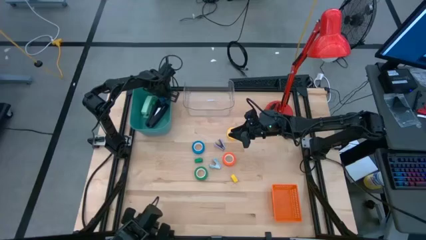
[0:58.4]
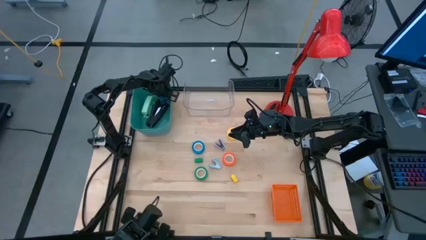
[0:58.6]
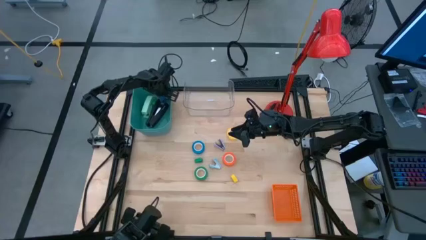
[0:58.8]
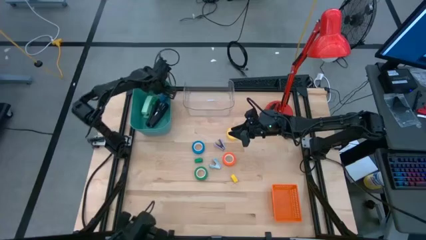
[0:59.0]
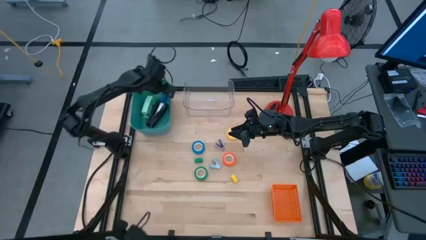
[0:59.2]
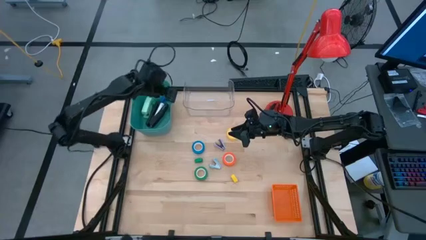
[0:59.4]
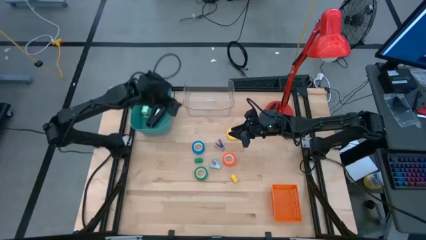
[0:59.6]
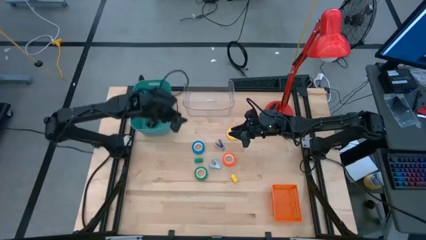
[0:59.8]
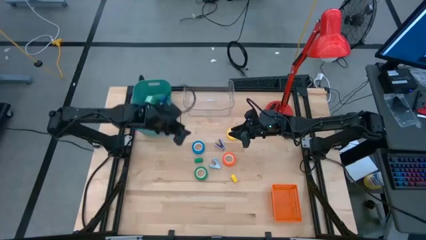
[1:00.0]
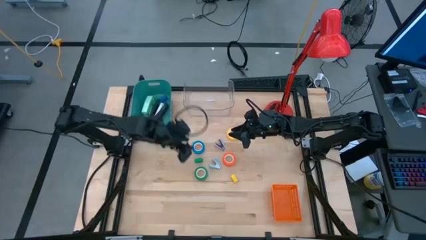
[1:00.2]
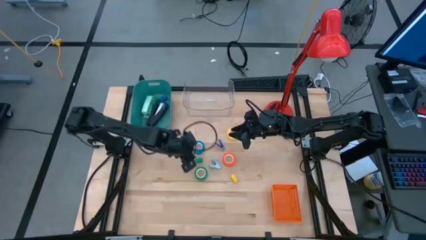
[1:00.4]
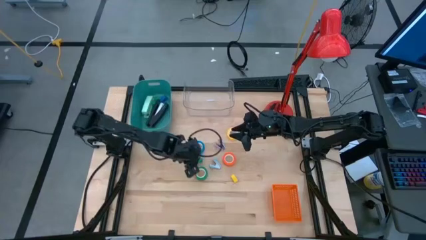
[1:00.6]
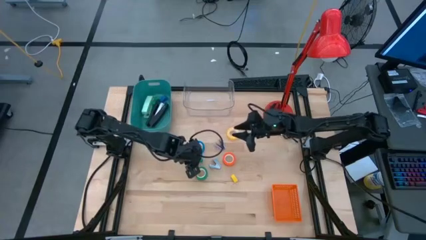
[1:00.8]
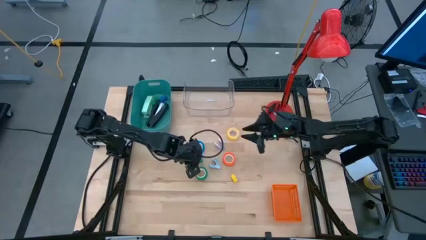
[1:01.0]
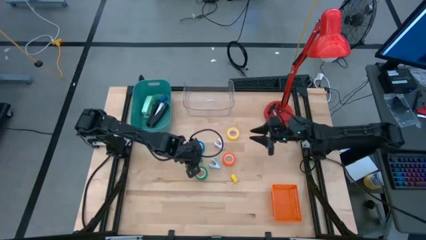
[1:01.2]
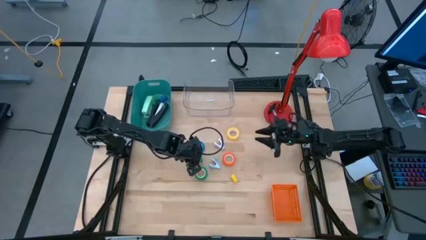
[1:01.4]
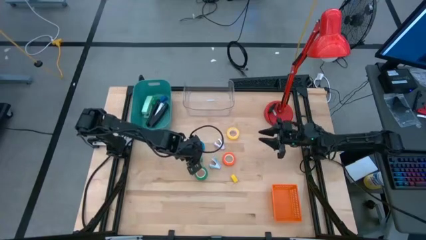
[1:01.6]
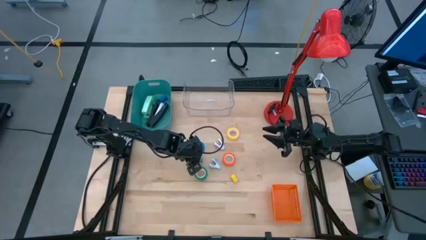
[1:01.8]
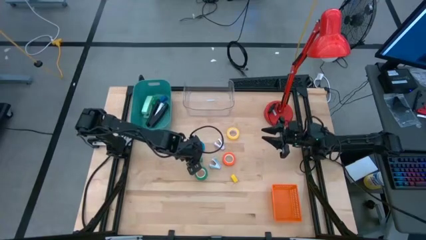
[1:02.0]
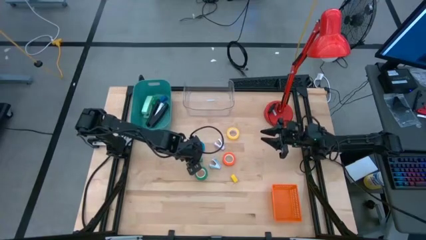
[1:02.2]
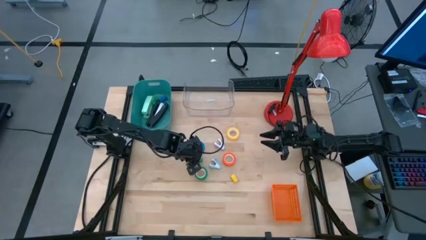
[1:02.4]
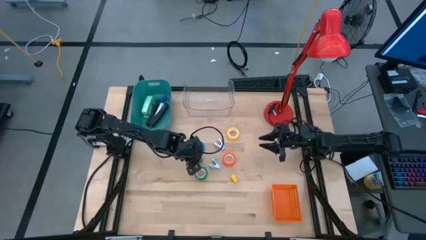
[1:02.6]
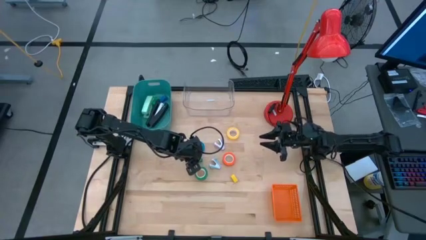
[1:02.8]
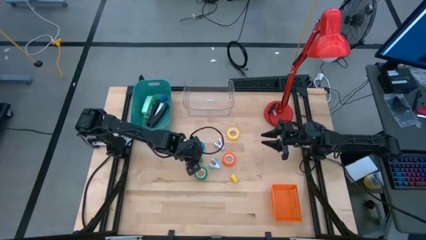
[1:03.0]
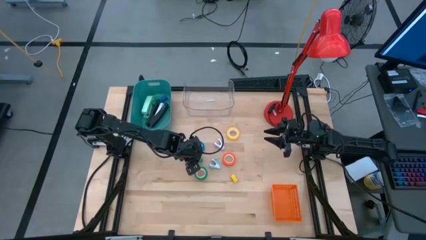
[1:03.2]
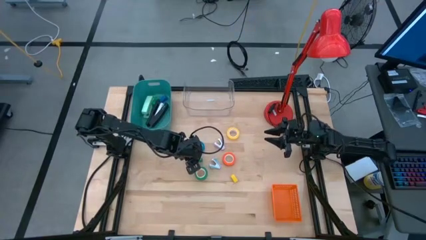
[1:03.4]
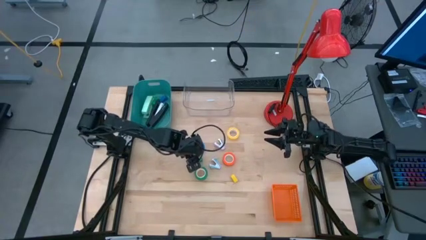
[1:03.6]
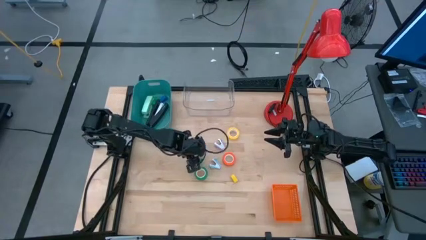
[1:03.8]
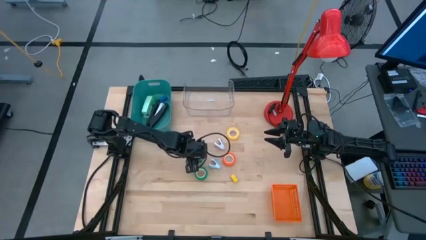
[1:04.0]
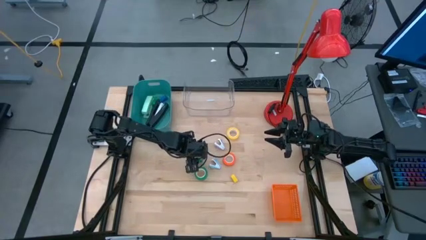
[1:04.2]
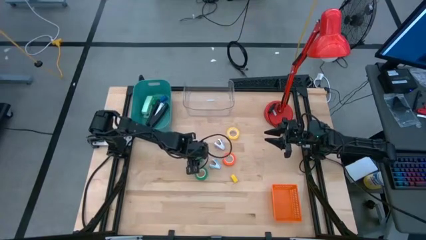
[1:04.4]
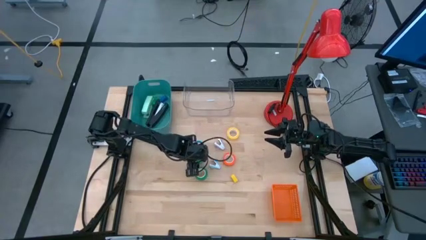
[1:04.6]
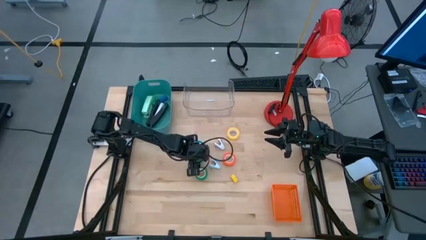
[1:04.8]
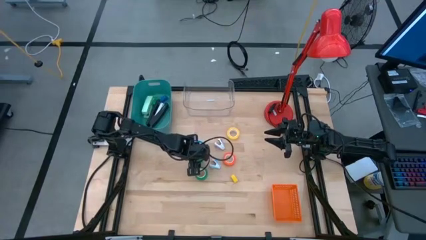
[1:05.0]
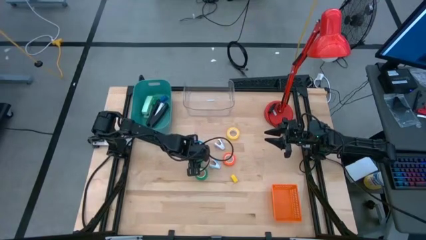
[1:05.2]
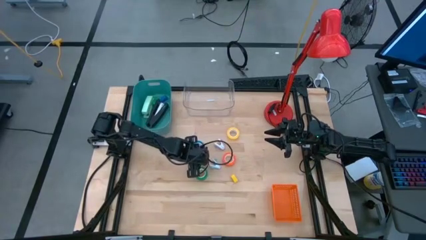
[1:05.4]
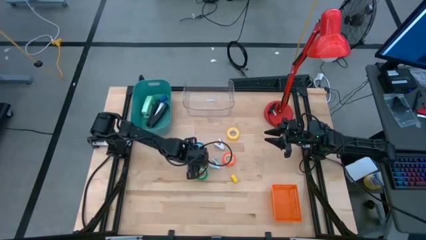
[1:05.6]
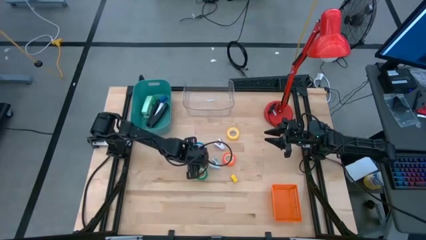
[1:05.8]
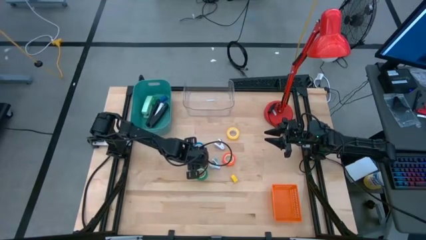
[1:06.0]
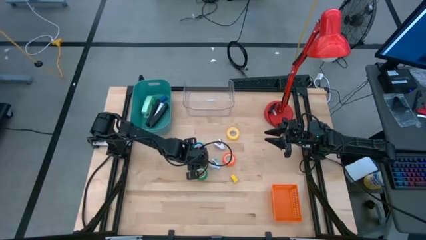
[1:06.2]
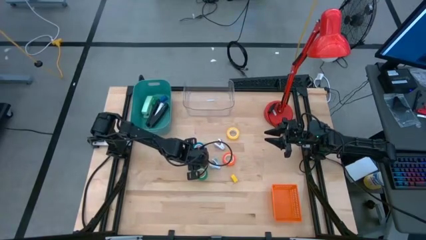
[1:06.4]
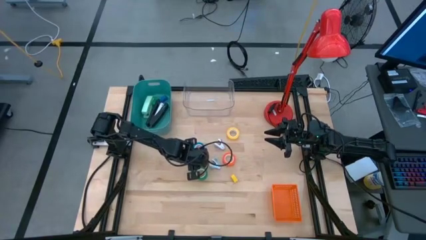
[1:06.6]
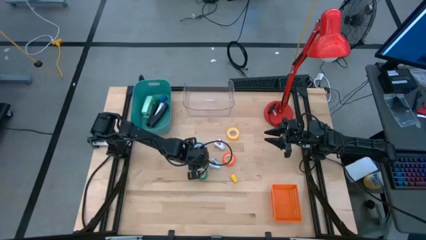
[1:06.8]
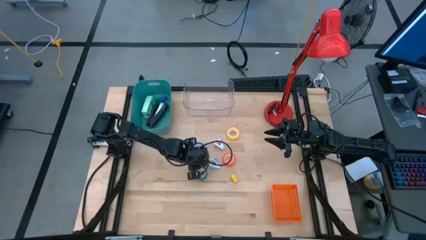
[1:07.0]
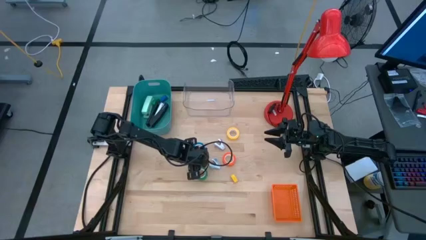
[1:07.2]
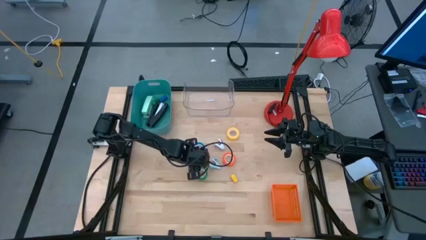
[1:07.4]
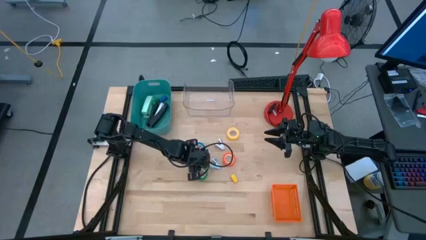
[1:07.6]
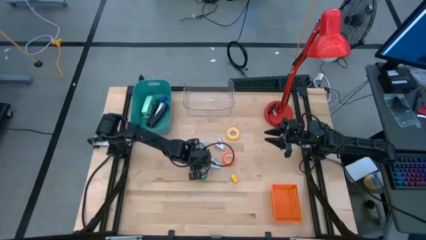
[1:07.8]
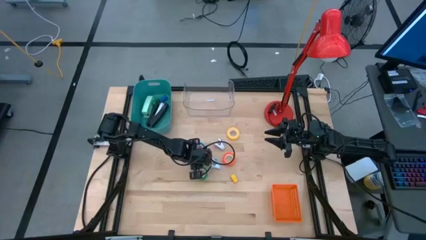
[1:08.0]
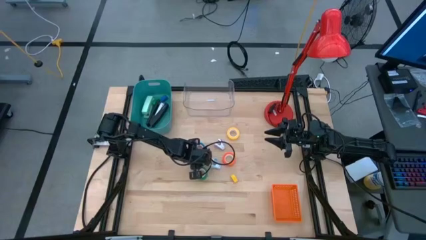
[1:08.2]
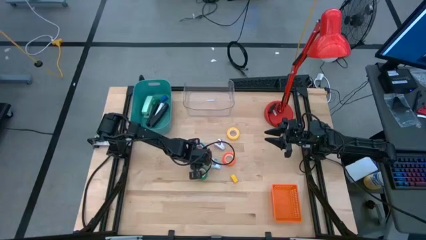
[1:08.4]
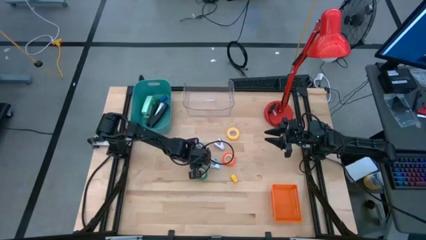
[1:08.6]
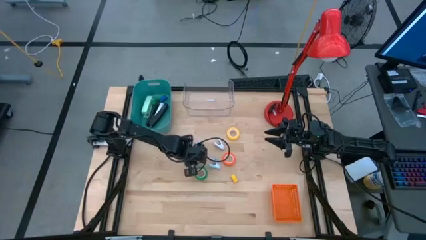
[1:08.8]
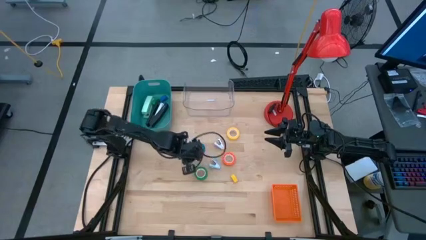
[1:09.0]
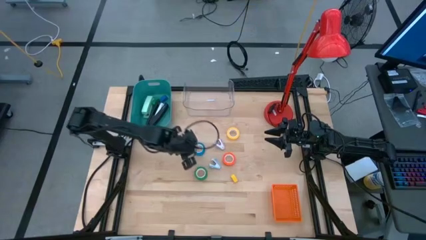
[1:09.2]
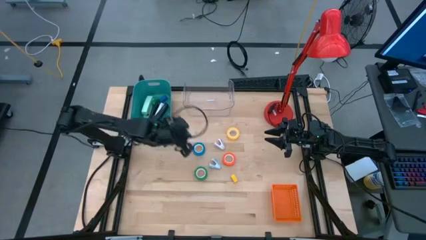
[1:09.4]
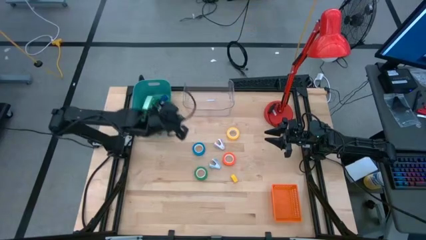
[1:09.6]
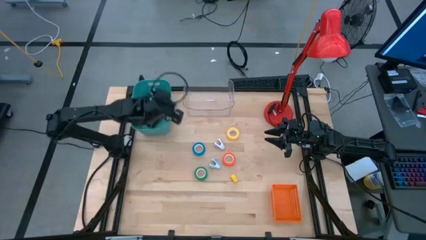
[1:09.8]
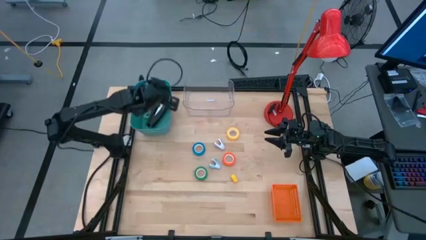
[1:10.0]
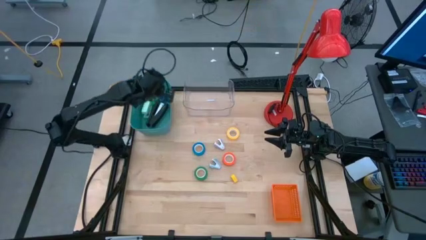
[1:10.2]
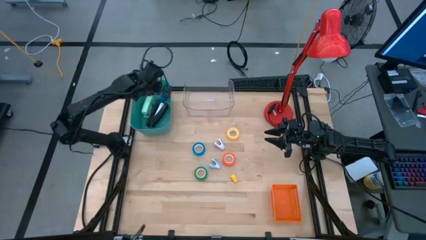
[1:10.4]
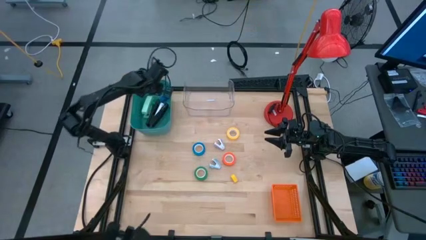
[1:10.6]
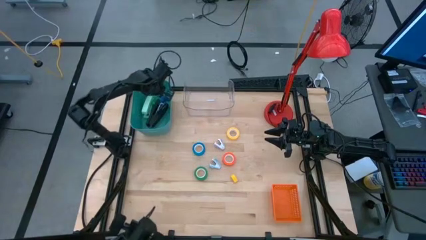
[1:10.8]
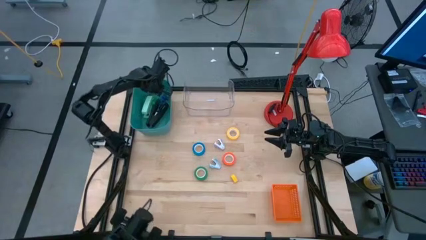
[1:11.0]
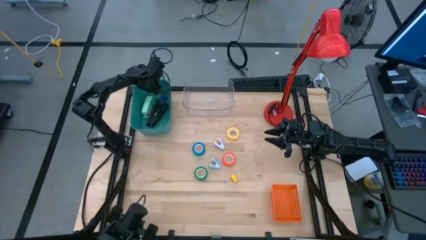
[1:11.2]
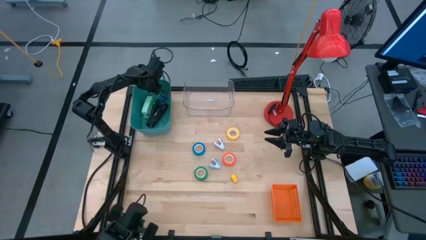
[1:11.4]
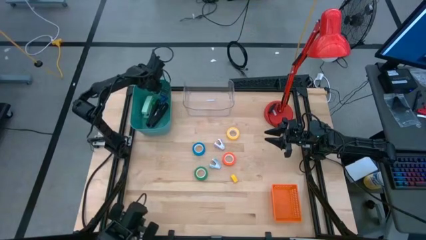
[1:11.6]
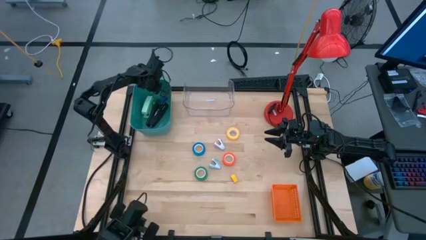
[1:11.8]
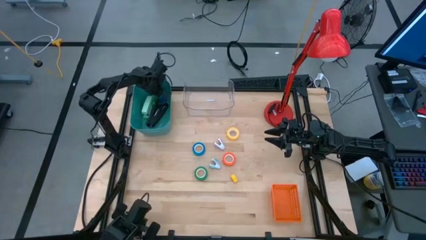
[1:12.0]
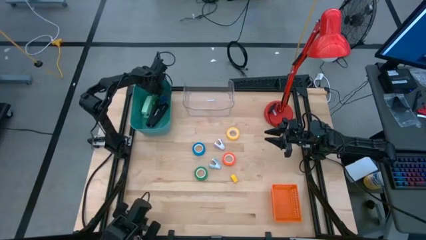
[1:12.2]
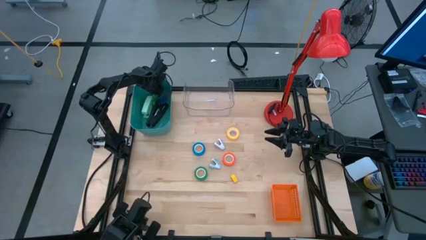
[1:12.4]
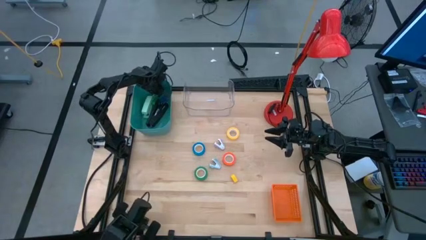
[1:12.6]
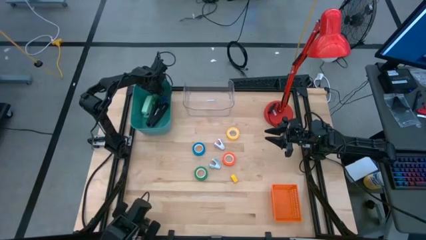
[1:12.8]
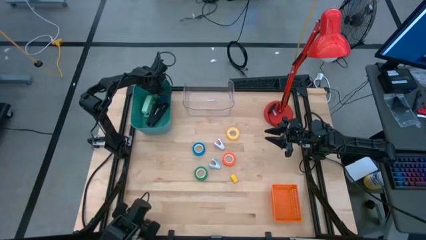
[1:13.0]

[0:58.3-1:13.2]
Task: Pick and place Stapler, Stapler remover, tape
Put the green stapler into the green bin
